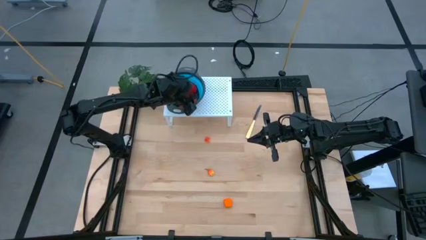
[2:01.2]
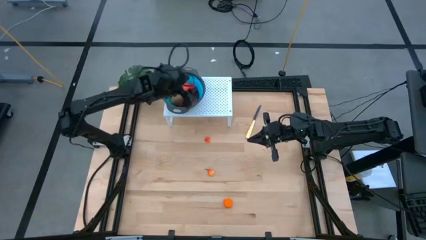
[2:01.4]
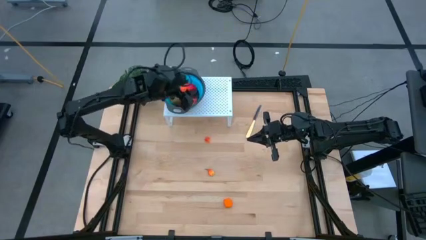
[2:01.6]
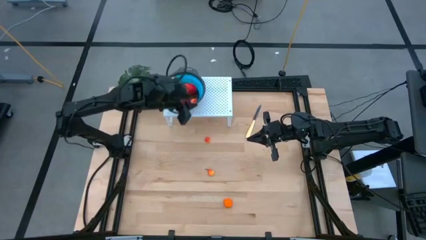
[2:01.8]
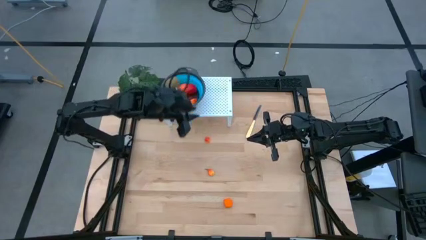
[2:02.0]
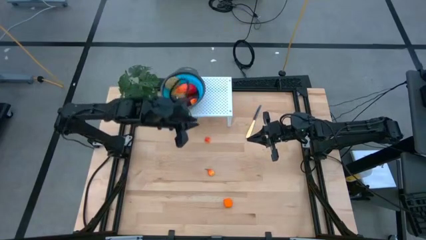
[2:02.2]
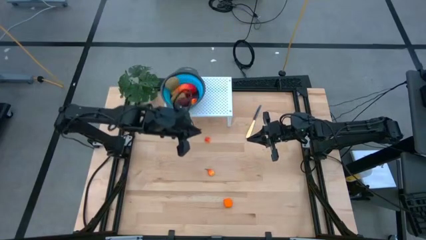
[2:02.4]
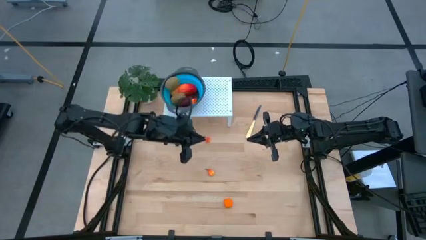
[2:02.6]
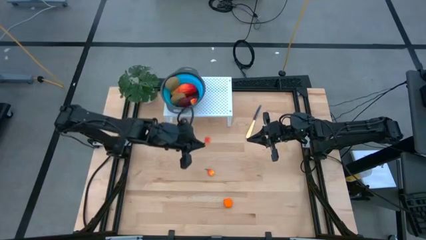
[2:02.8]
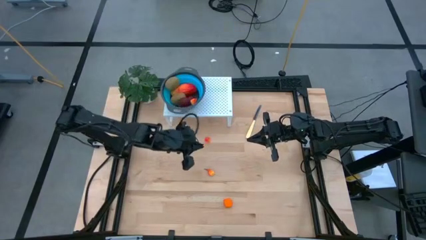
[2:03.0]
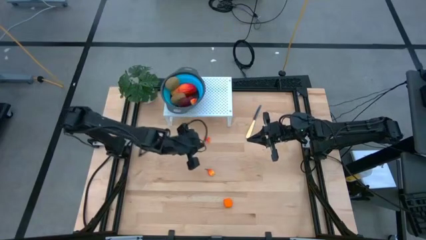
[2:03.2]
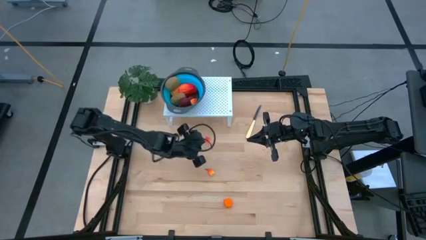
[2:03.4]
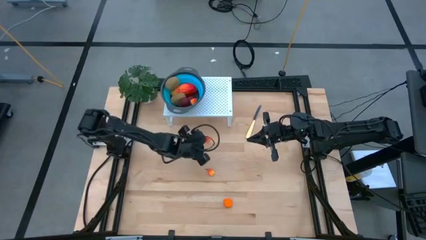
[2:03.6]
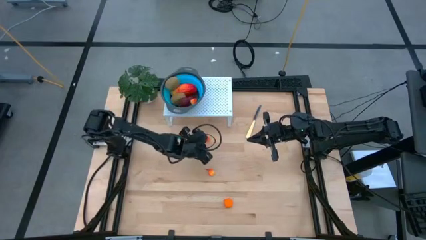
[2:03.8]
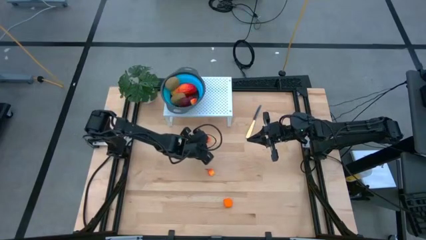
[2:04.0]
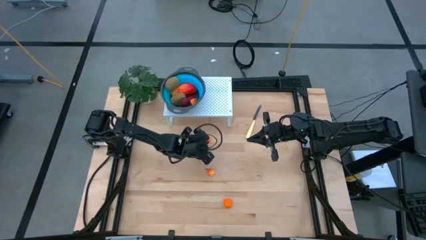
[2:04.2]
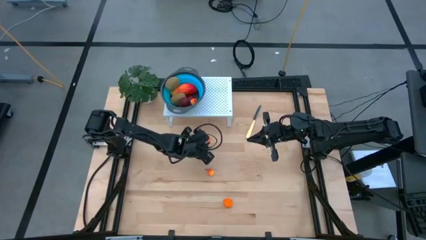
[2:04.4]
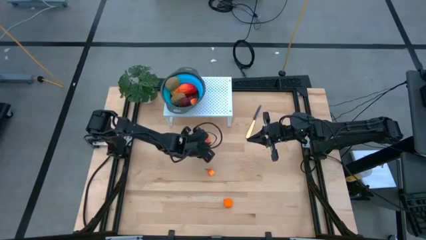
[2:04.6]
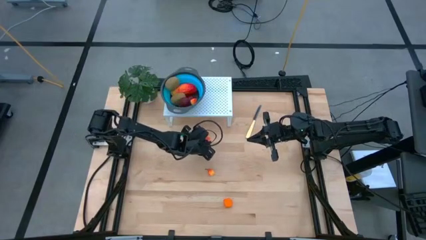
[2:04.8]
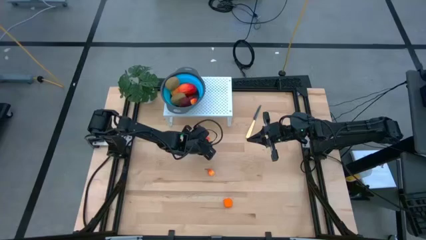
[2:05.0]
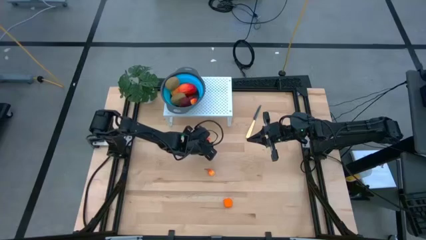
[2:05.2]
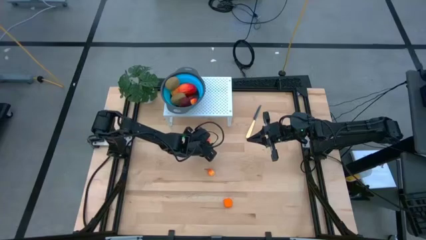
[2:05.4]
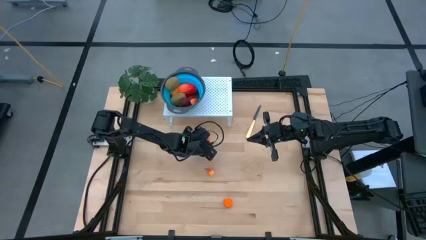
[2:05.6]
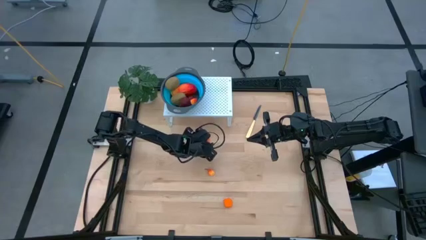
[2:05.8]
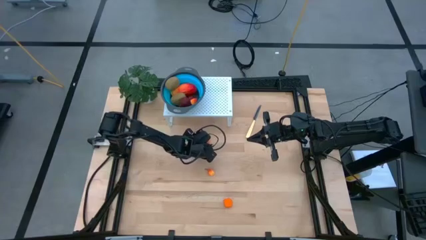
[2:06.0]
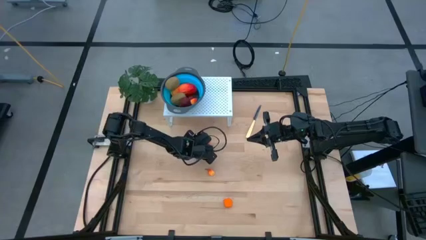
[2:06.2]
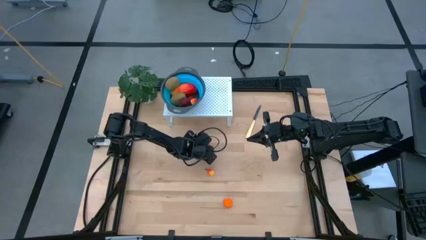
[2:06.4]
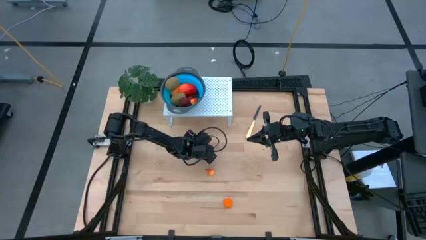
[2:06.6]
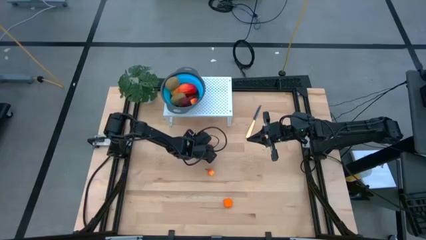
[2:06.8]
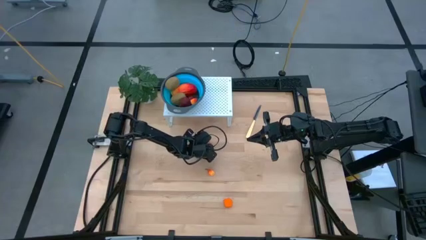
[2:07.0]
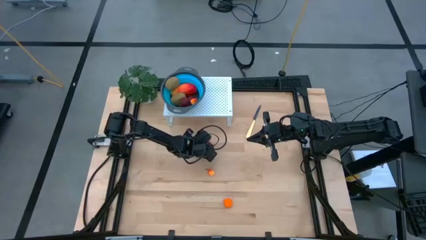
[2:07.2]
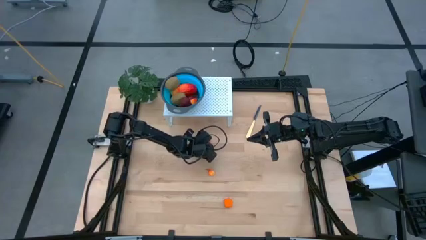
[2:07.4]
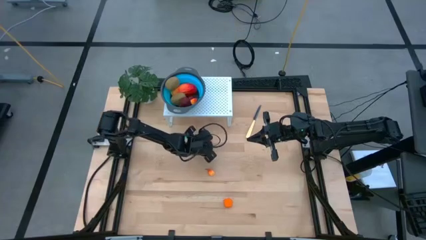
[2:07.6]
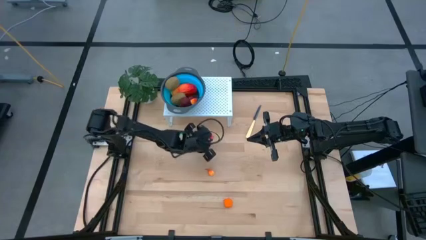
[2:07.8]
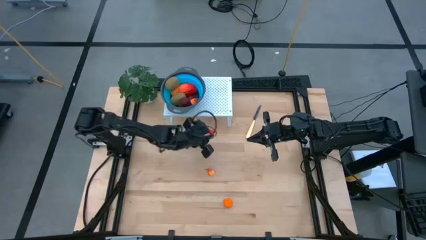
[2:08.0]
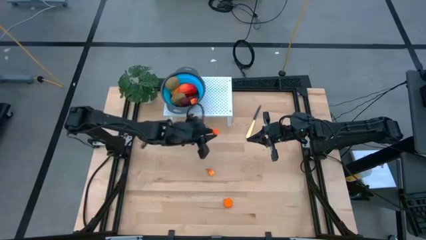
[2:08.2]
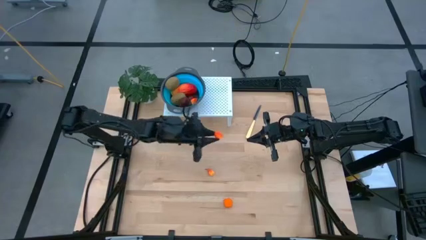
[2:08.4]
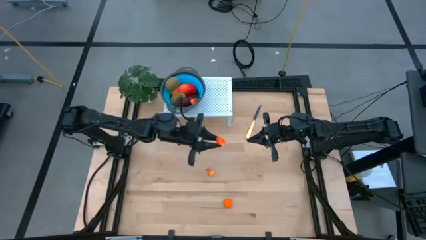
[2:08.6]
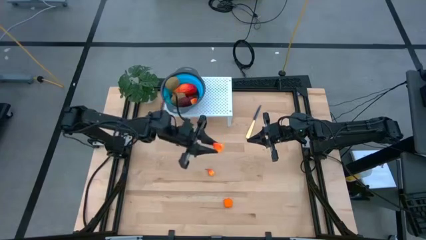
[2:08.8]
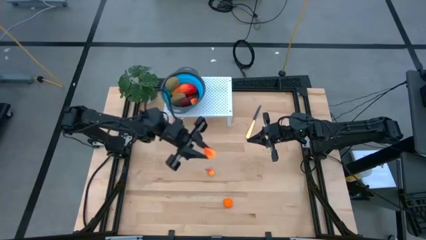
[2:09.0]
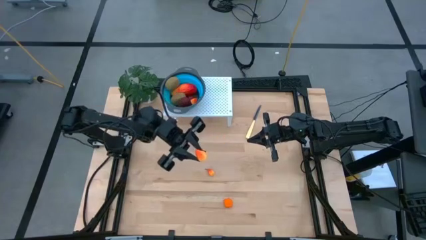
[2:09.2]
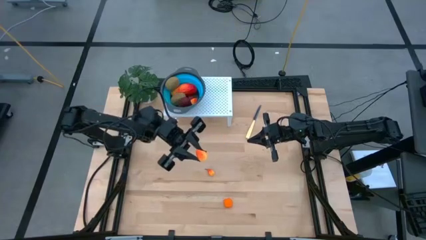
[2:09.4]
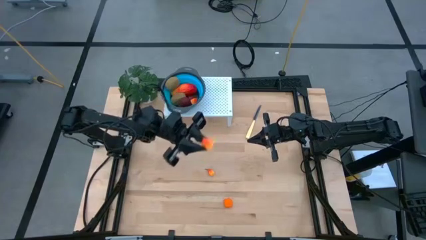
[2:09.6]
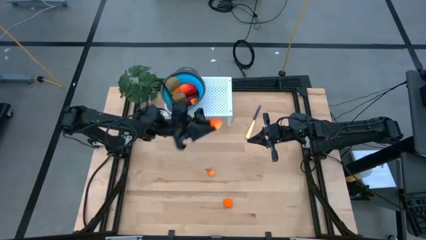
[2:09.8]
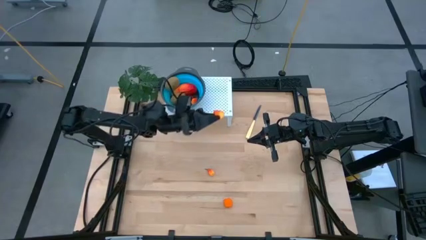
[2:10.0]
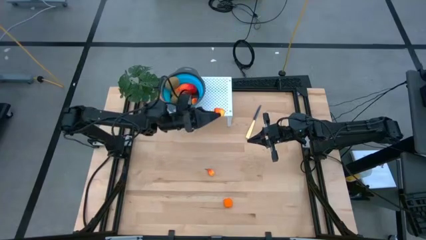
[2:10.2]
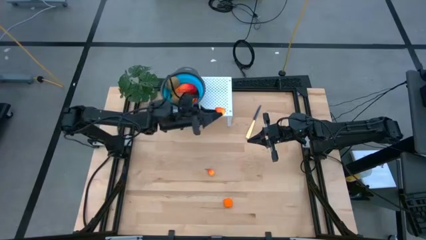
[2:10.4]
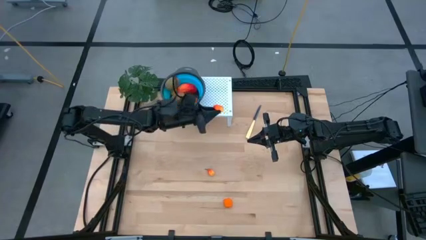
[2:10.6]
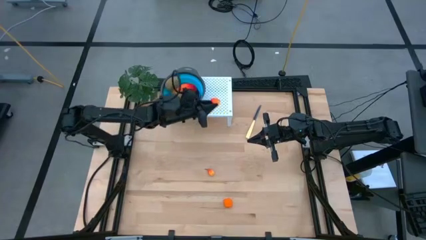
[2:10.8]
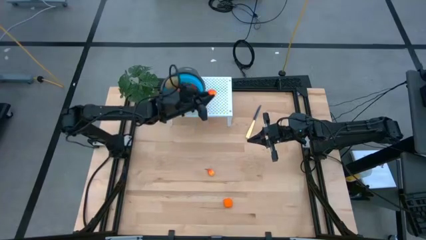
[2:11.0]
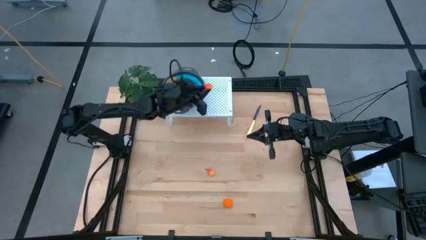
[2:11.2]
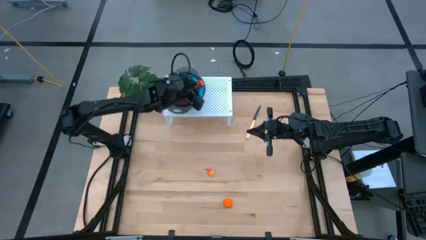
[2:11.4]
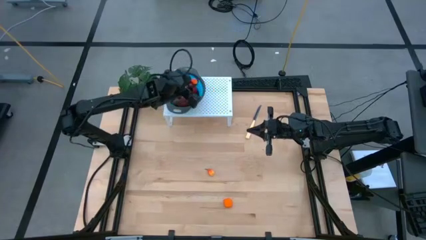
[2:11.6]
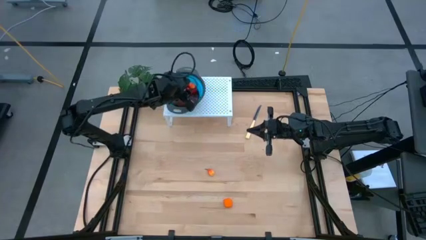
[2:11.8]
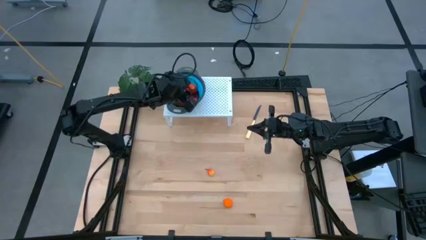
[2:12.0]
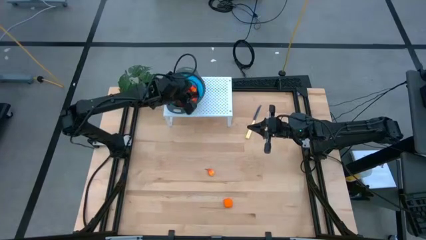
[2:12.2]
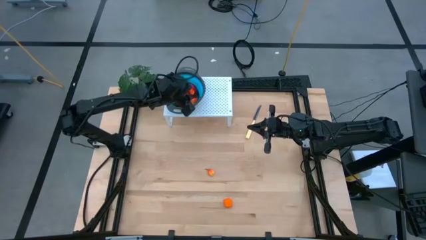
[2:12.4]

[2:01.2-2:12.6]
Task: Pick & Place Fruit
Put the peas into the strainer bowl on the shelf

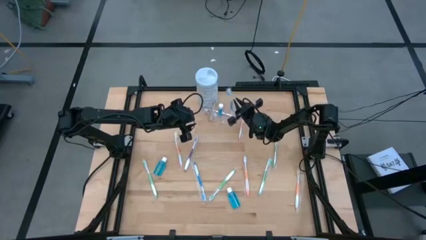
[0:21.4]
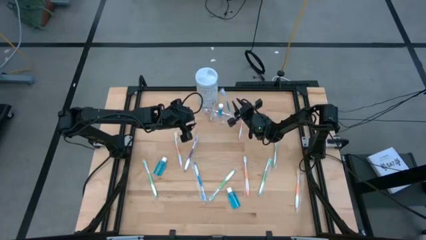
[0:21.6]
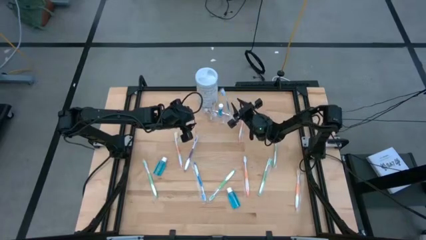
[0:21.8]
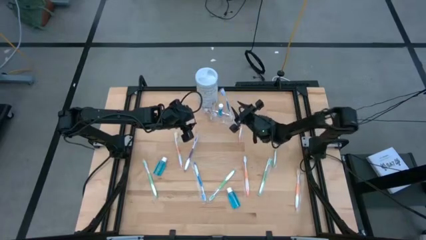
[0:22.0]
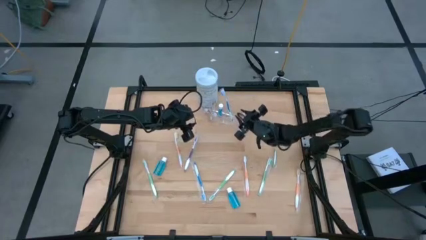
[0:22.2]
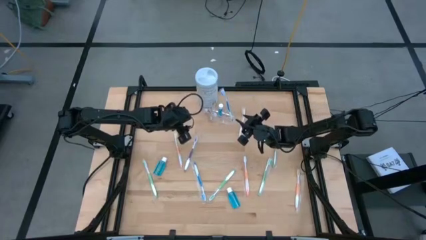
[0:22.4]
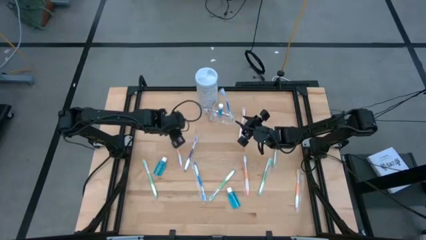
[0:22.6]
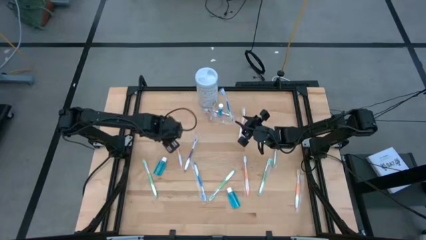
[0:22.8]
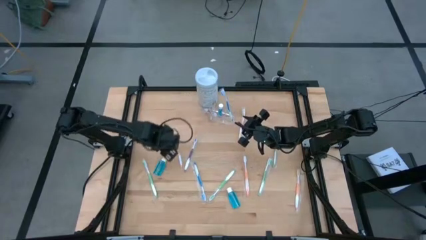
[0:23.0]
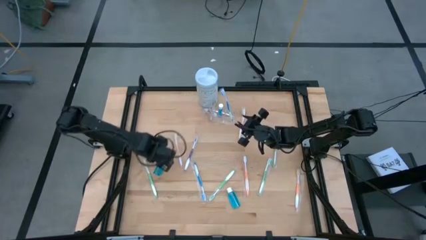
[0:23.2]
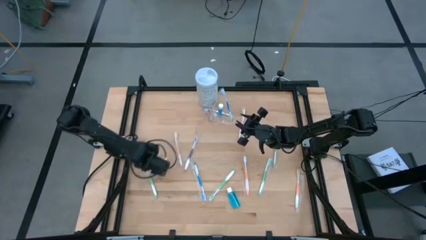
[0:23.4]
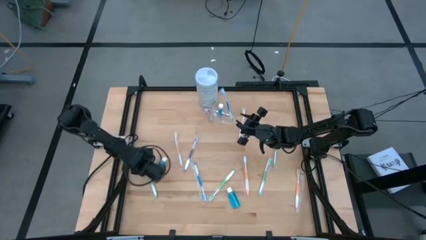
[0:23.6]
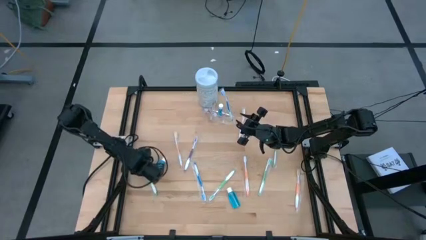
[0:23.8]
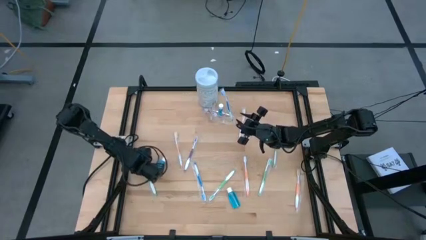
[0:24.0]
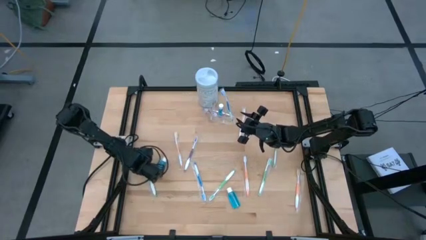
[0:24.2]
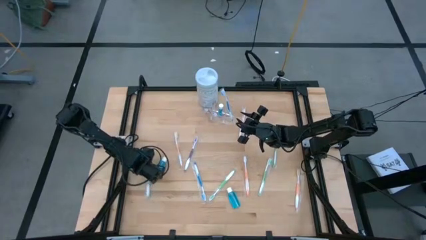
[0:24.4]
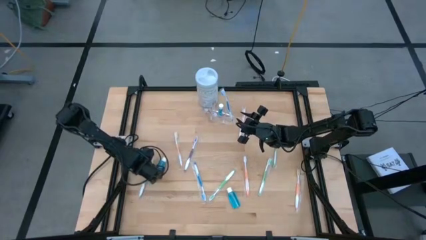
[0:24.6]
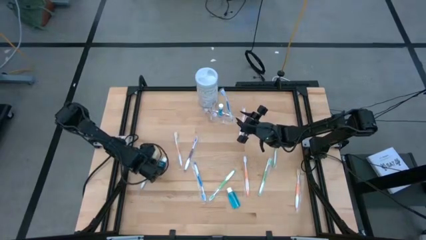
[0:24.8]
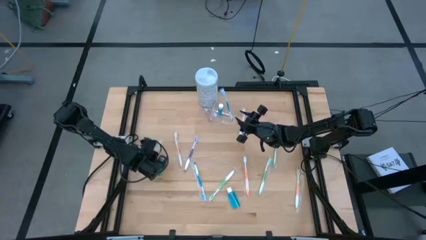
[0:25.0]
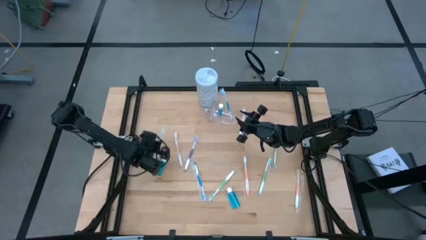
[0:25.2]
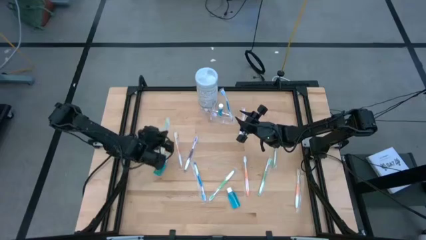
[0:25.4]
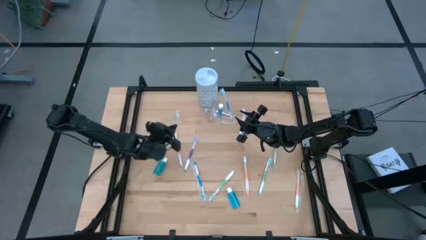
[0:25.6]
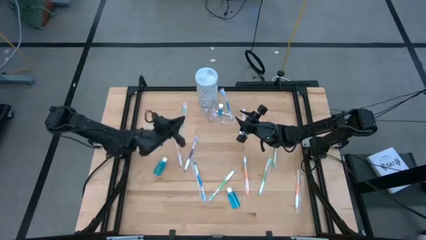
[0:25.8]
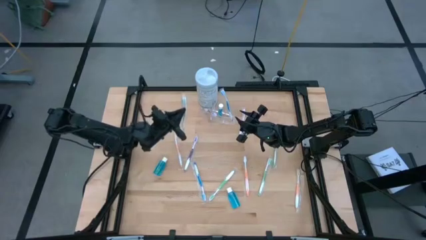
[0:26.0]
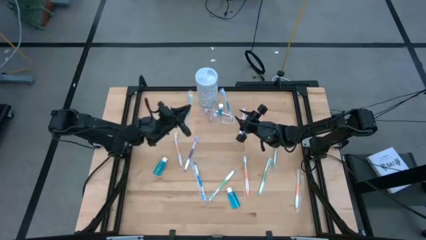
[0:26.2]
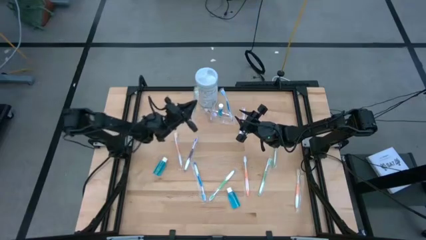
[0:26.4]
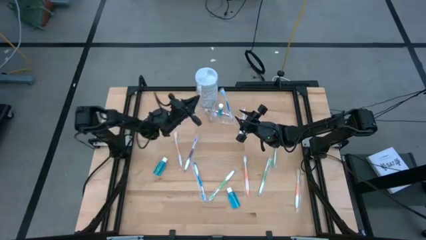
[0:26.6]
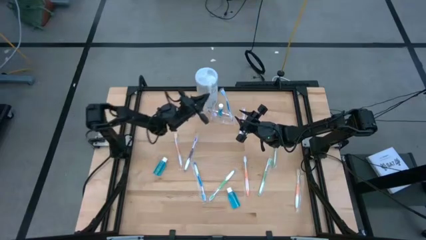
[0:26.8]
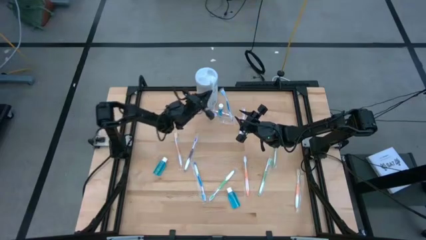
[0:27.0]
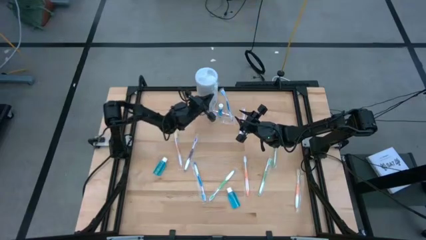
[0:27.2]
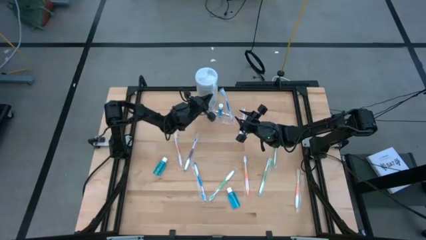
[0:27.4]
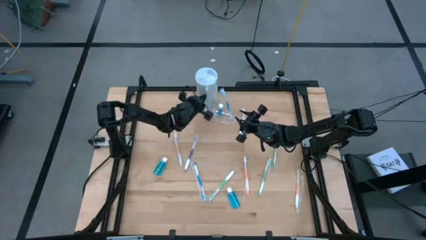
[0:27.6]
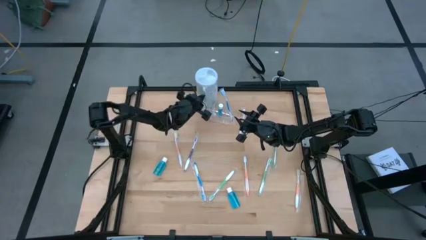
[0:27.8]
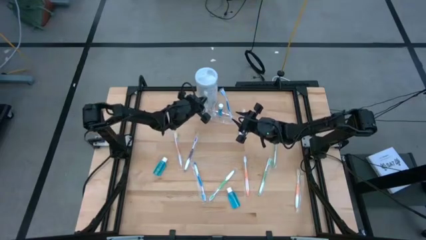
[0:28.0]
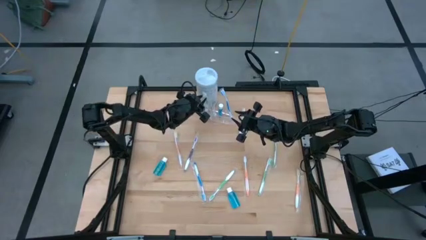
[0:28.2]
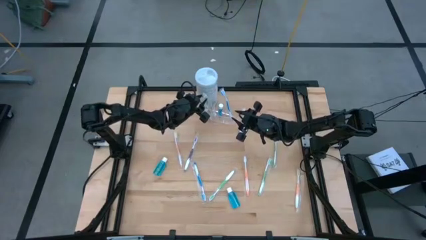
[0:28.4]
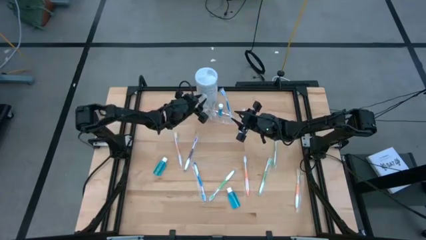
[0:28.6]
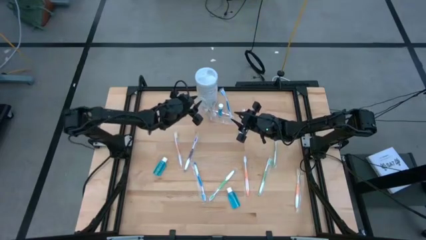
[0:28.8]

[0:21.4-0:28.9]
Task: Pick & Place toothbrushing station
Put the green toothbrush into the transparent organizer
